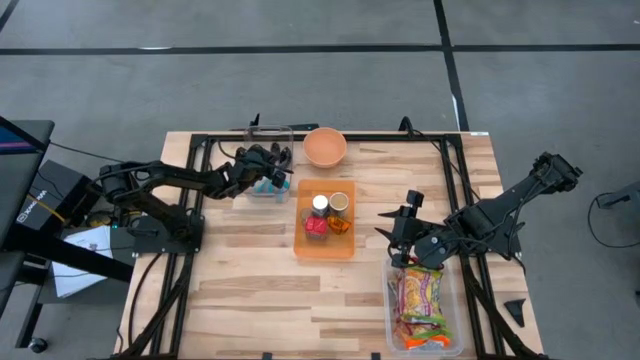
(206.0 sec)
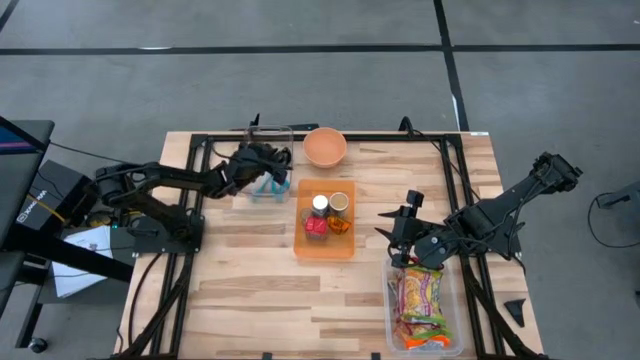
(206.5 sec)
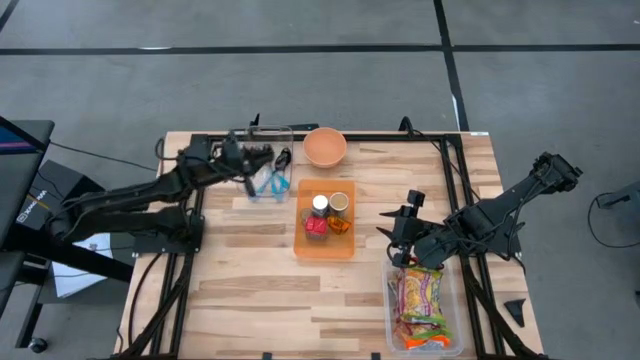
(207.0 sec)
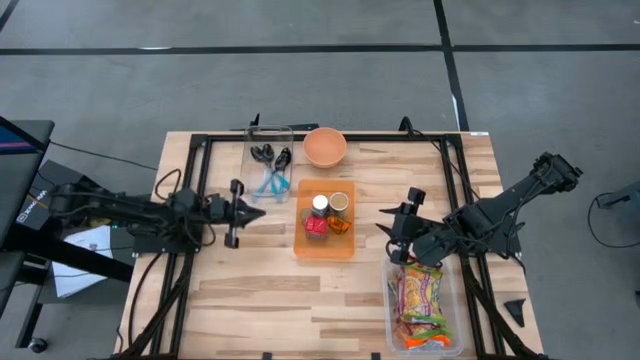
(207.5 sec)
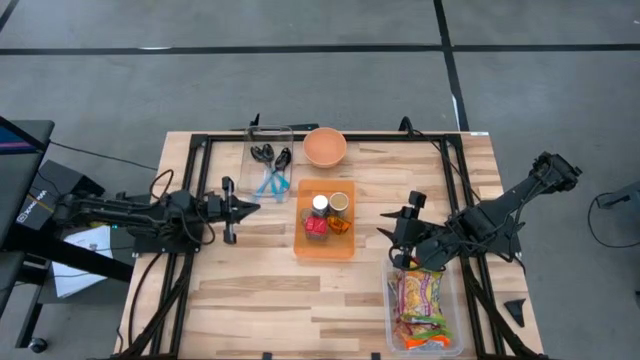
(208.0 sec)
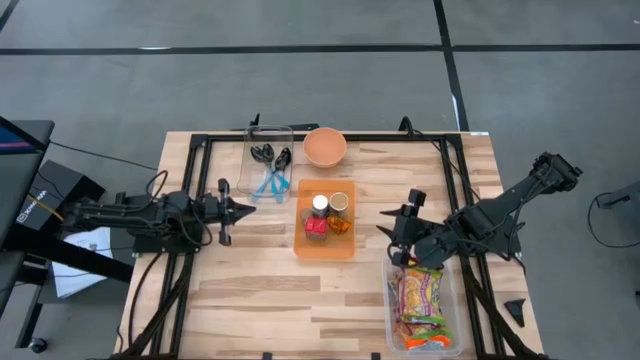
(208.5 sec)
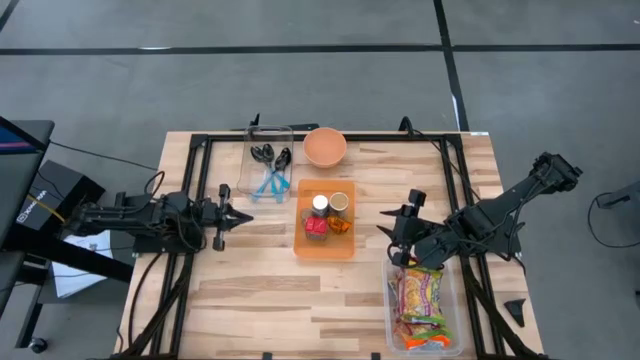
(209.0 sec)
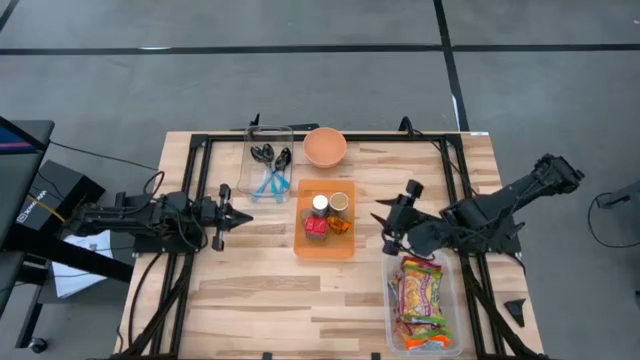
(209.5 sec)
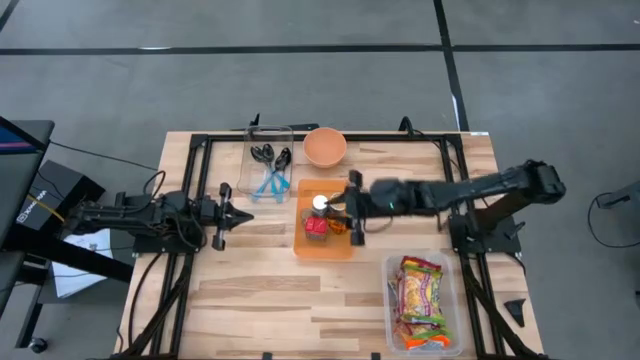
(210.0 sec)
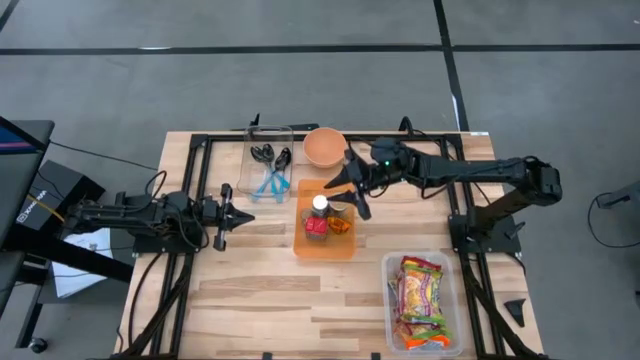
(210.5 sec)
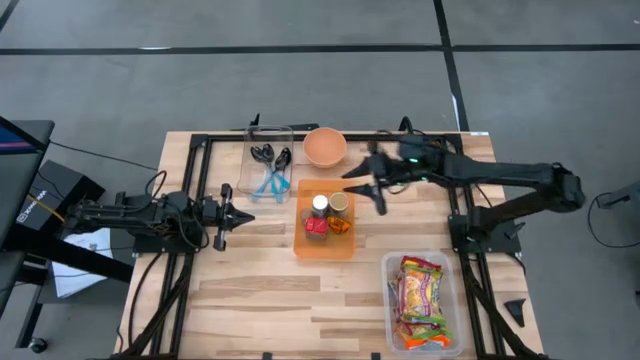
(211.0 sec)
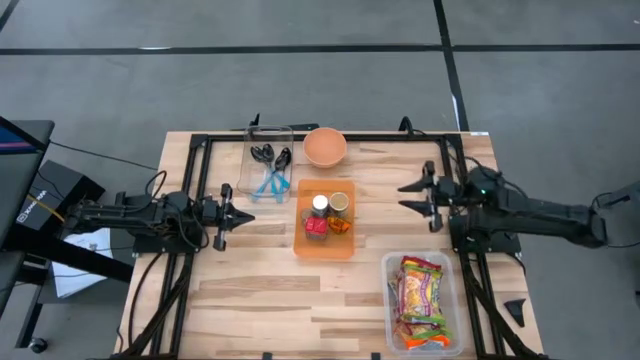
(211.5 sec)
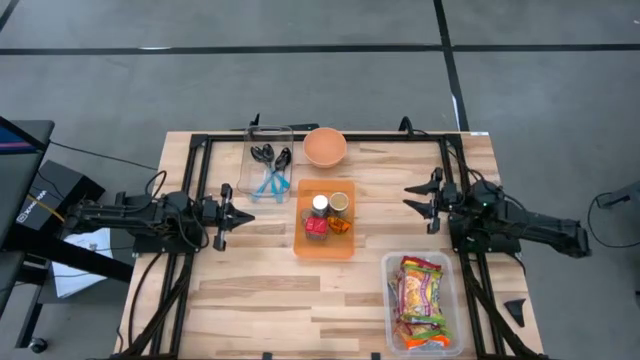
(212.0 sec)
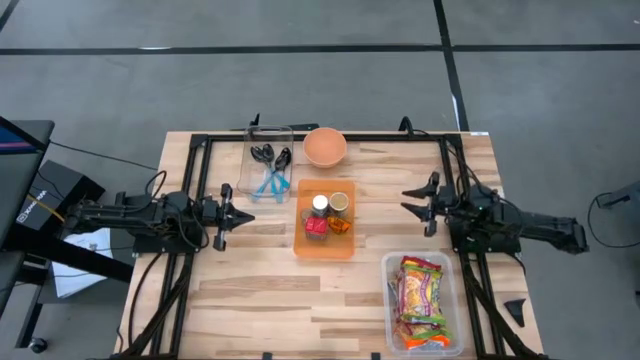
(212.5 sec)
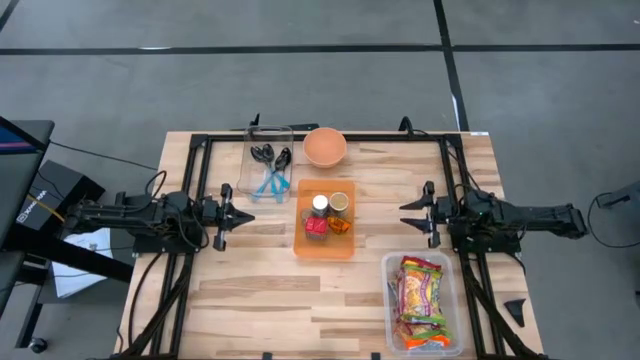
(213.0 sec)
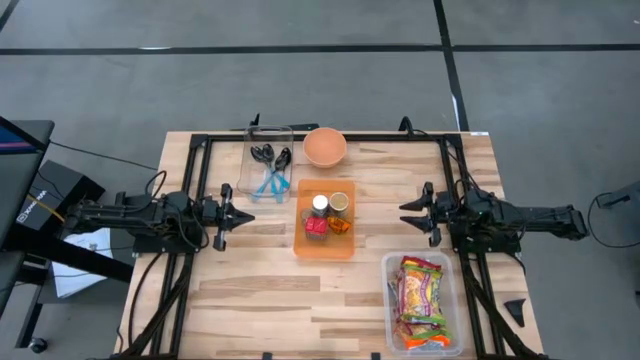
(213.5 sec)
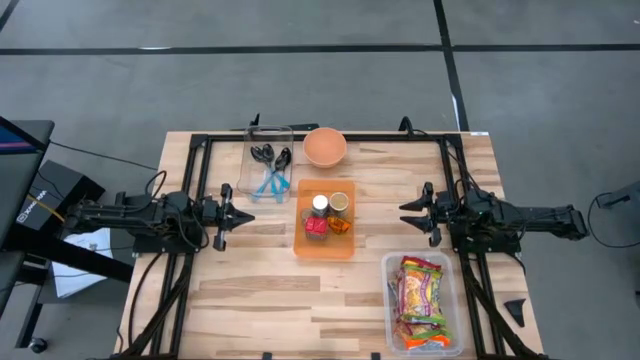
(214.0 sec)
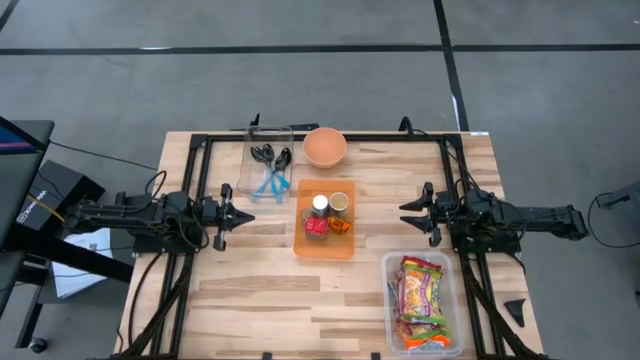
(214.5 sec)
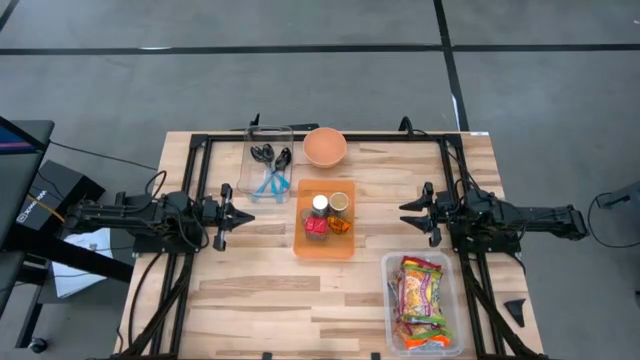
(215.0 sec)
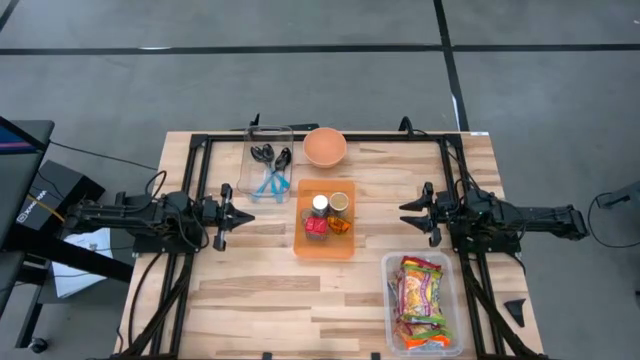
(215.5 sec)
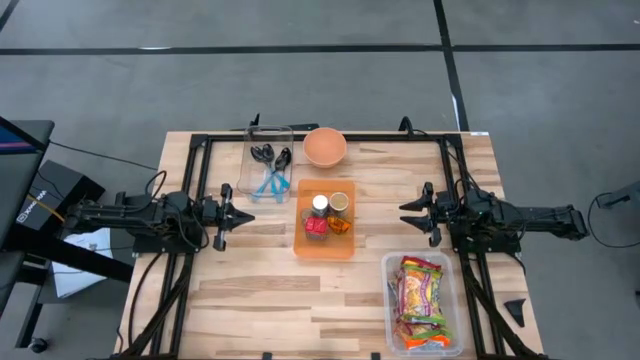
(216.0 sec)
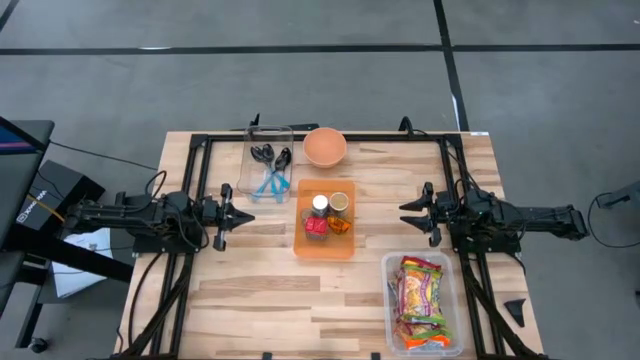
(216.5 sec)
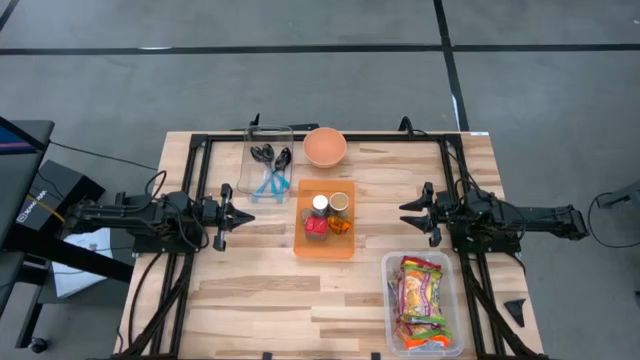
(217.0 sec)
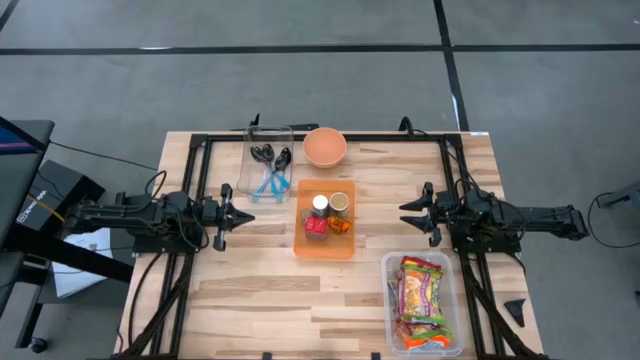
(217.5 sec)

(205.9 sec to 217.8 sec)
Task: Pick & Place Food Item
Return to Home Position
